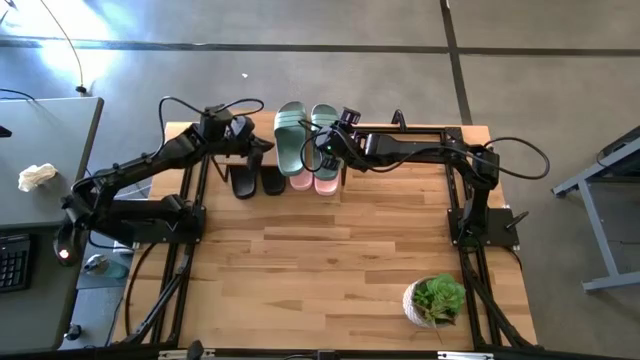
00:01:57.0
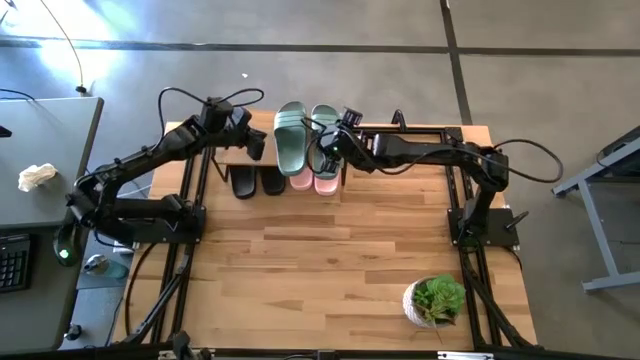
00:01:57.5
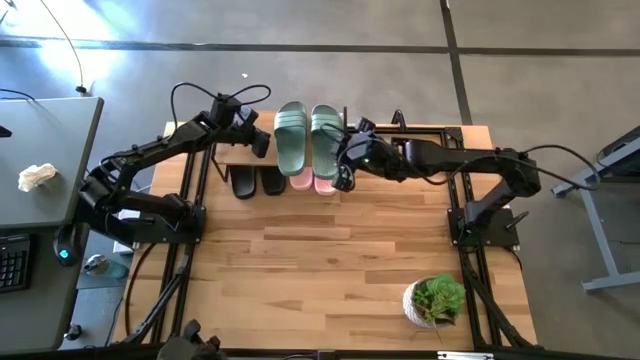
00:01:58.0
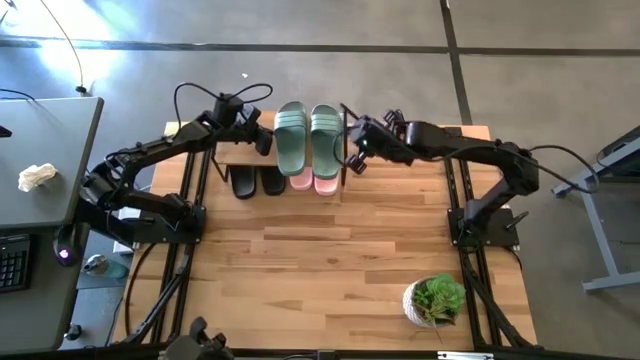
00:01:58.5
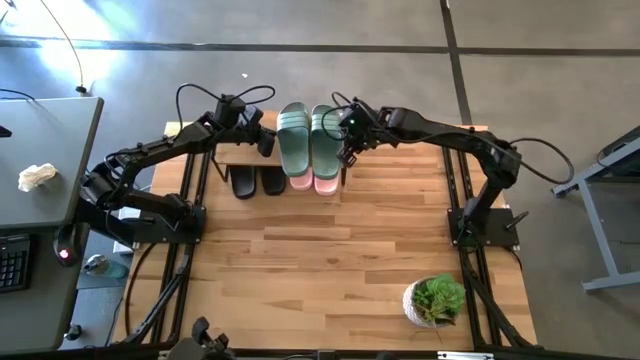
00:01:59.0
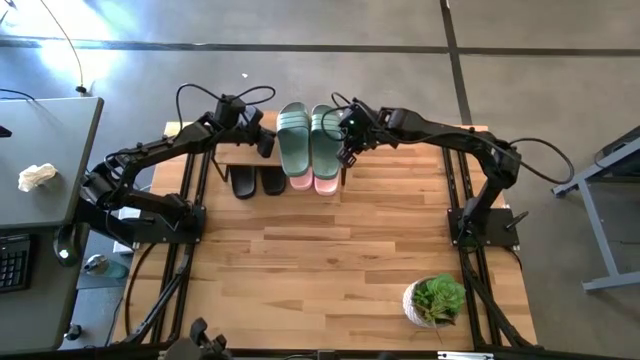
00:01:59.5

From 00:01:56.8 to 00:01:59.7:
Task: Pick and place slides into the shelf
Adjust the blue slipper on the shelf

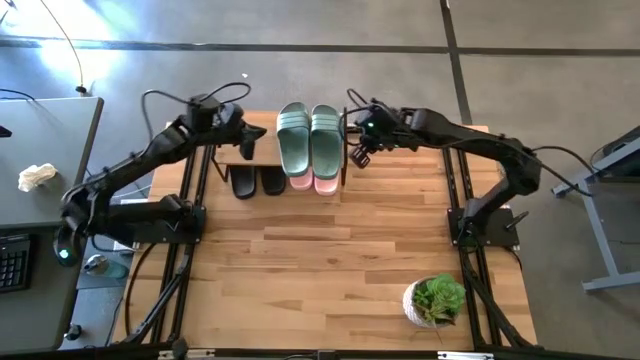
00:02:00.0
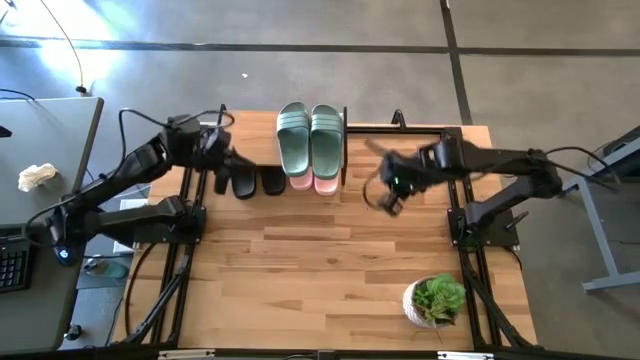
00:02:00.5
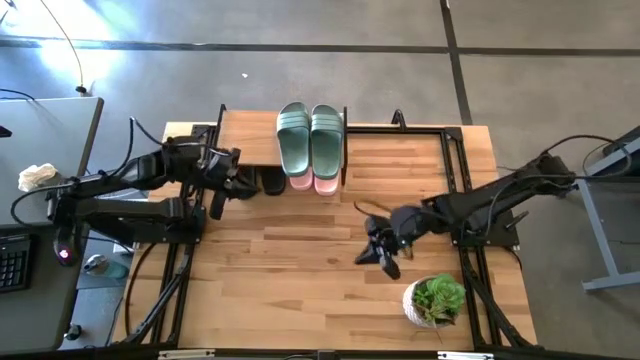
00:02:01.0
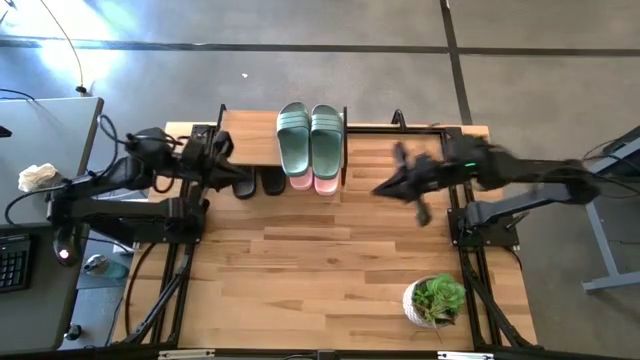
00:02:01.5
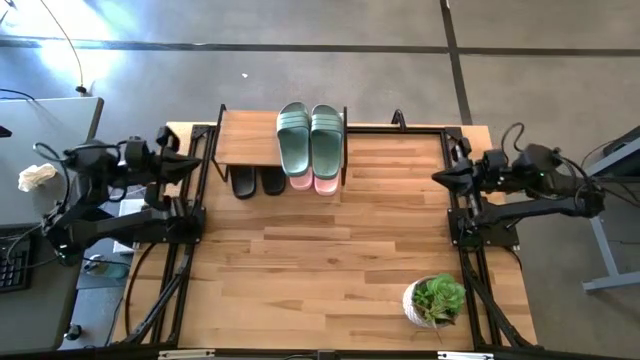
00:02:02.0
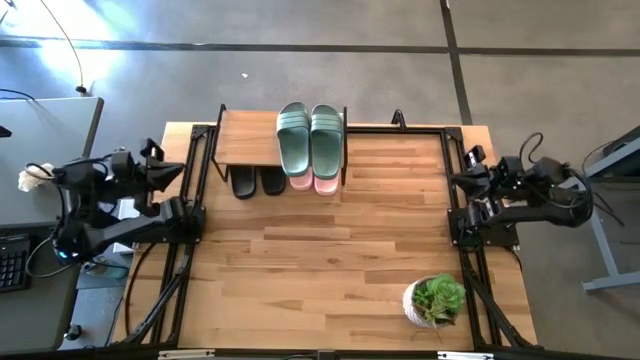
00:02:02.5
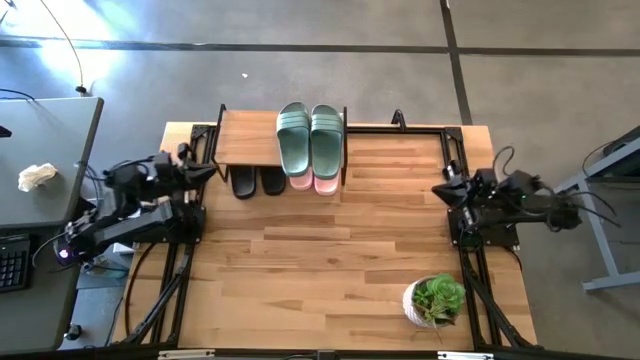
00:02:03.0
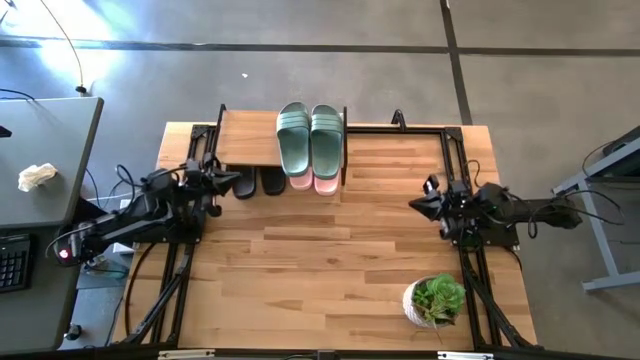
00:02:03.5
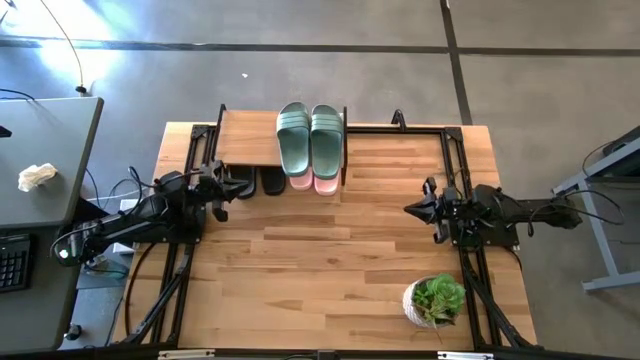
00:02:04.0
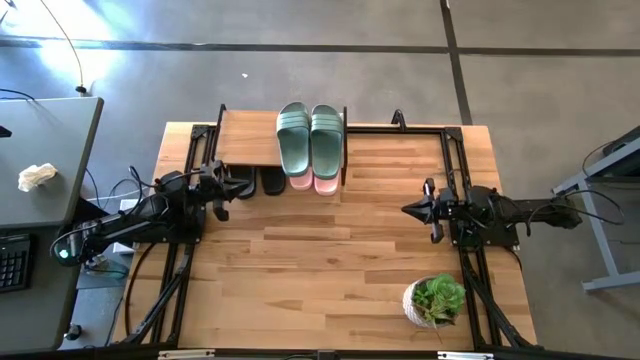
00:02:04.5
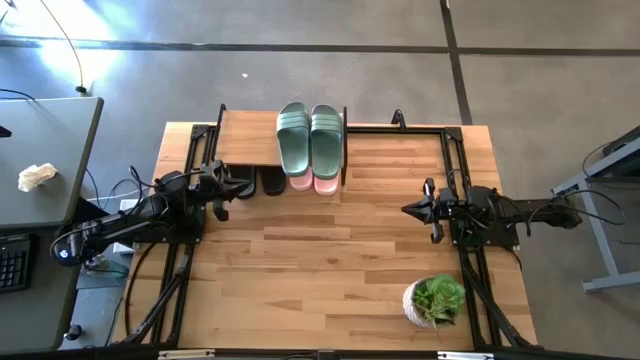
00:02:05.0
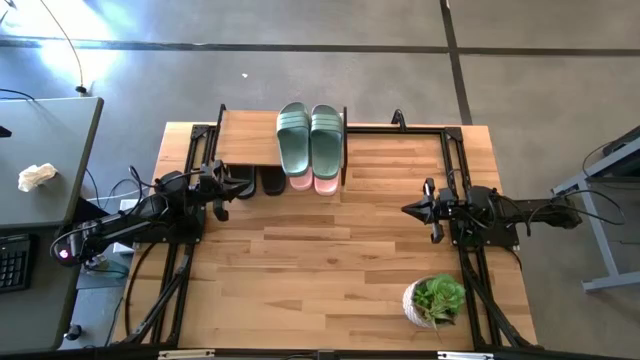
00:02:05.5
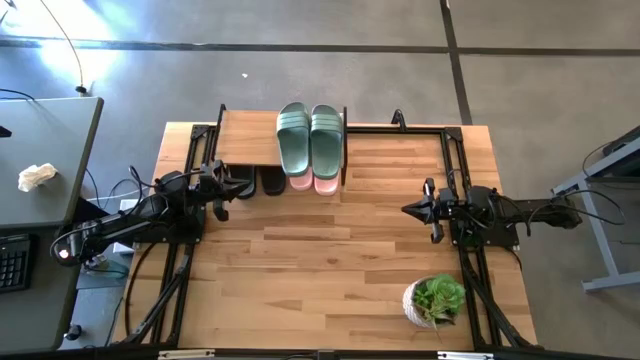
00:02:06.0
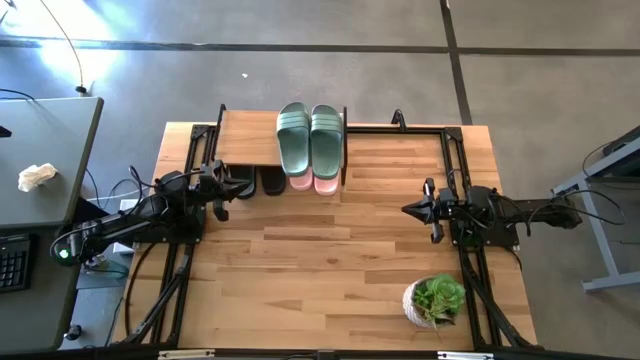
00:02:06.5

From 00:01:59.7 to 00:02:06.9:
Return to Home Position

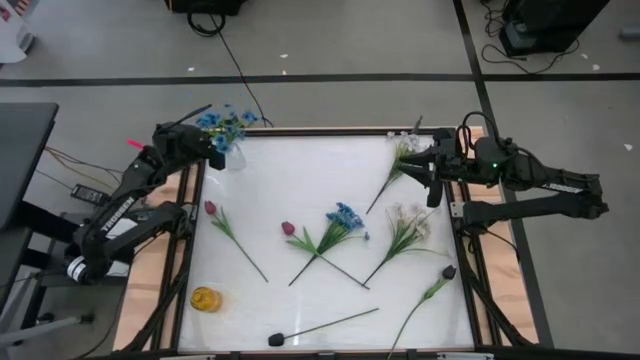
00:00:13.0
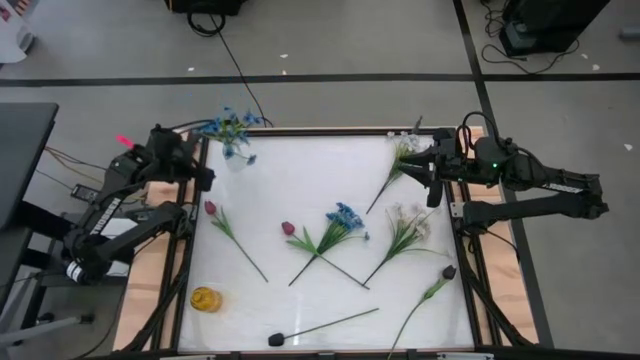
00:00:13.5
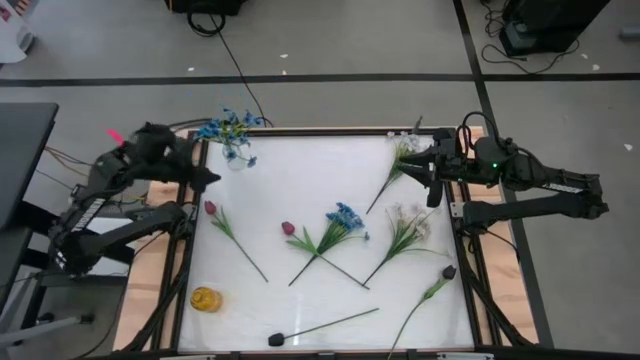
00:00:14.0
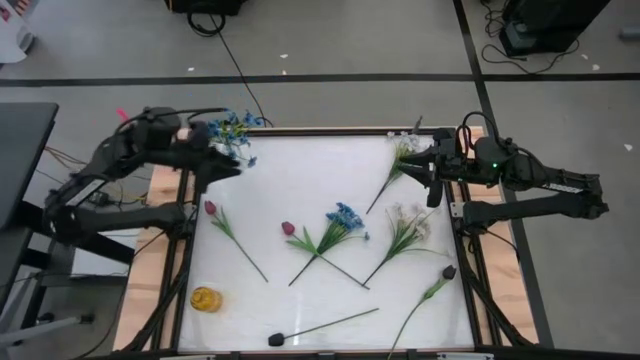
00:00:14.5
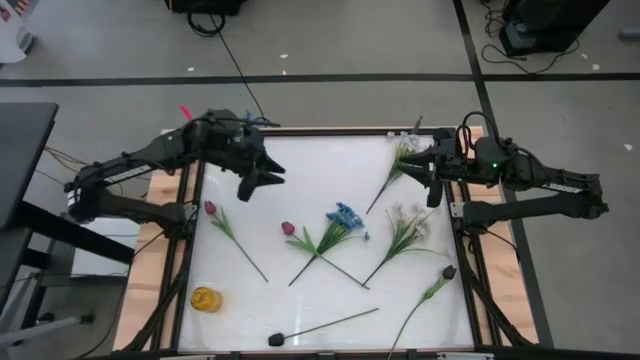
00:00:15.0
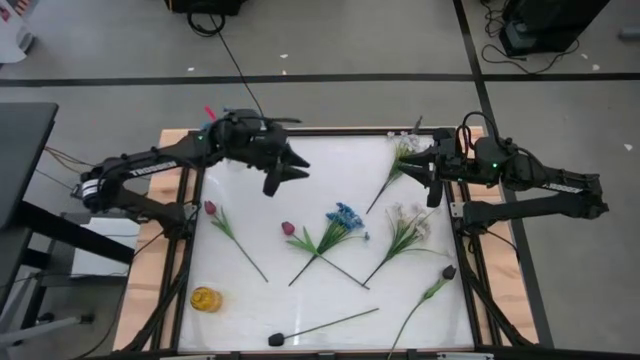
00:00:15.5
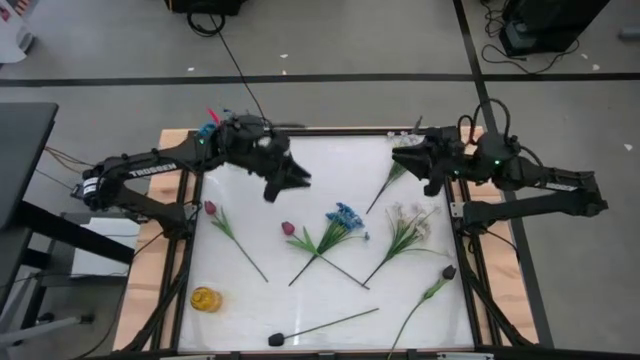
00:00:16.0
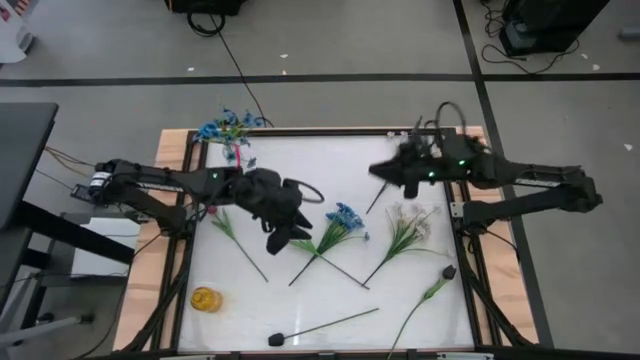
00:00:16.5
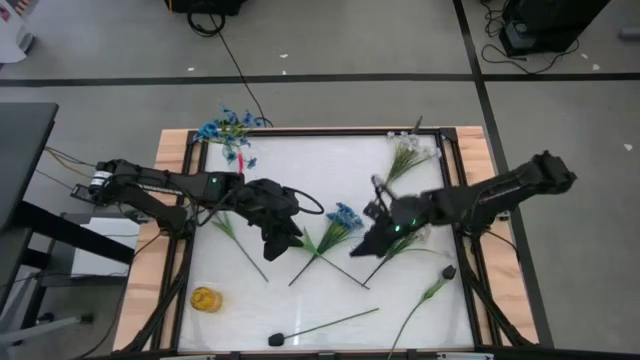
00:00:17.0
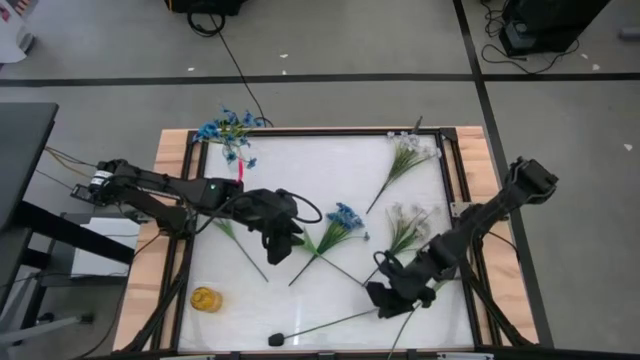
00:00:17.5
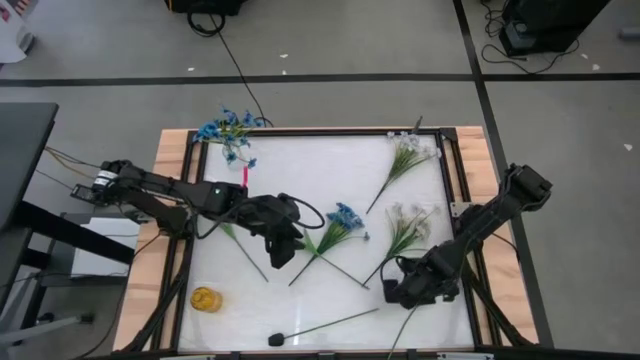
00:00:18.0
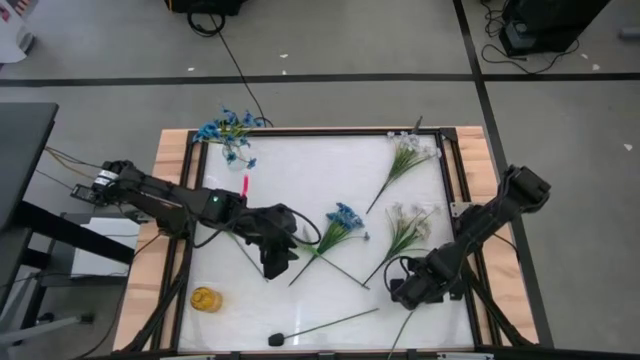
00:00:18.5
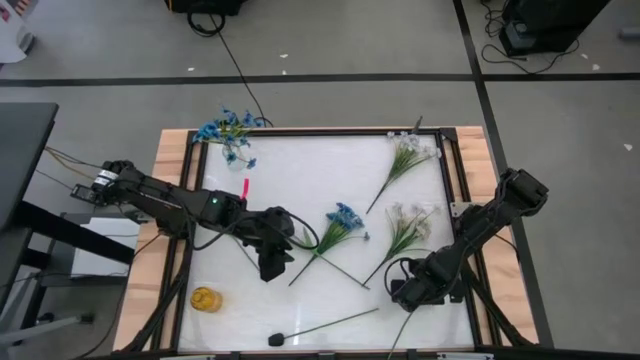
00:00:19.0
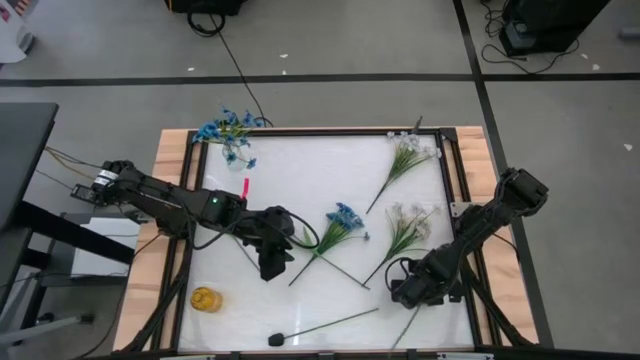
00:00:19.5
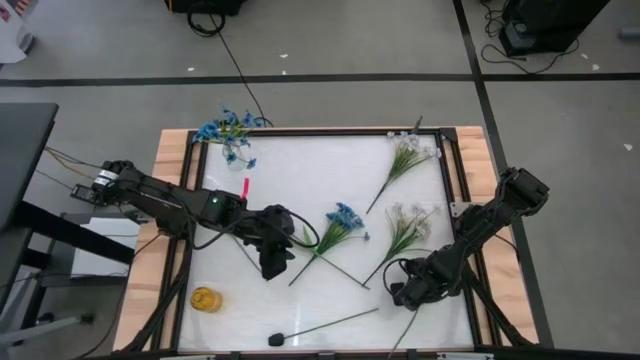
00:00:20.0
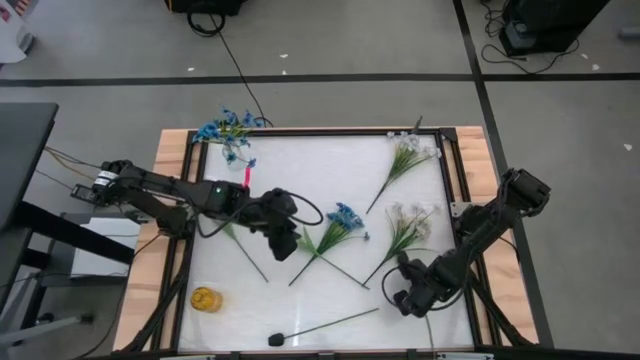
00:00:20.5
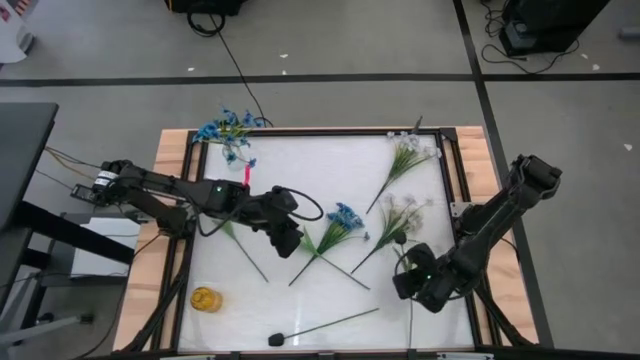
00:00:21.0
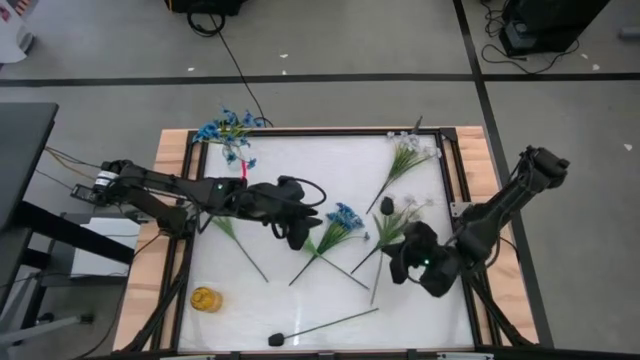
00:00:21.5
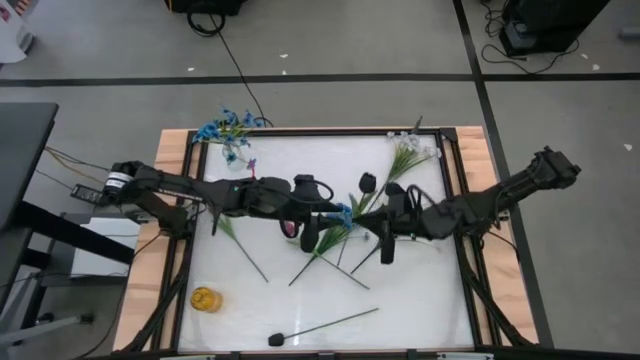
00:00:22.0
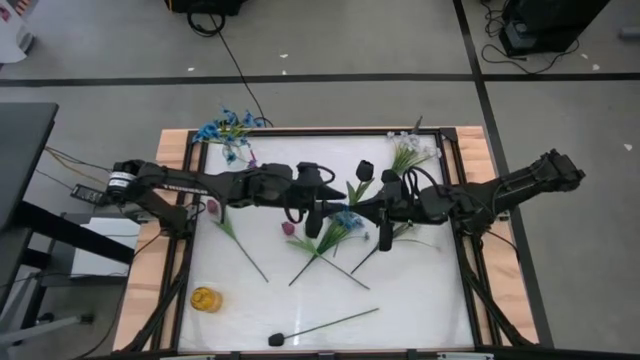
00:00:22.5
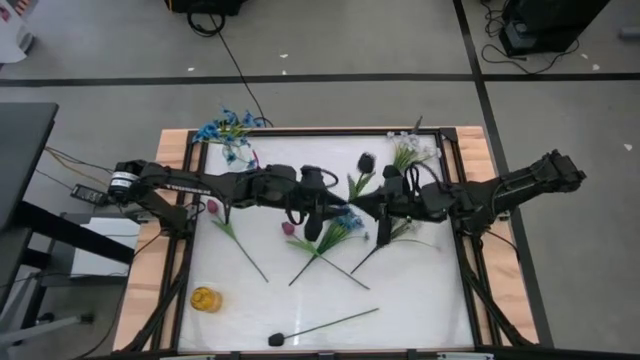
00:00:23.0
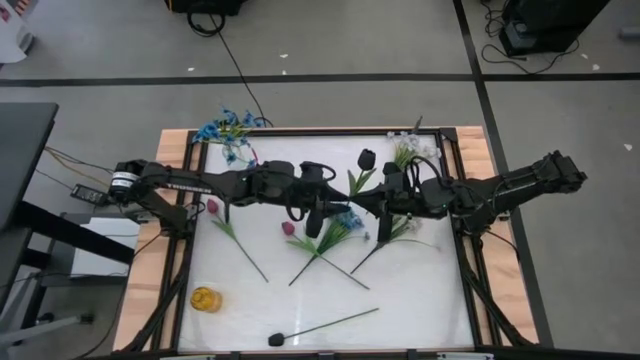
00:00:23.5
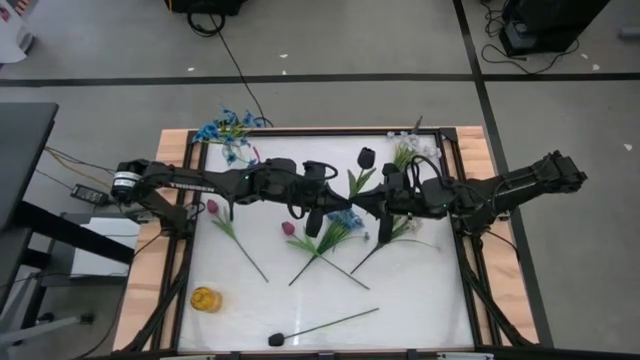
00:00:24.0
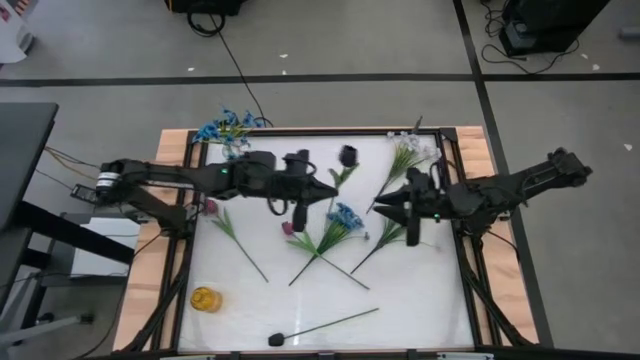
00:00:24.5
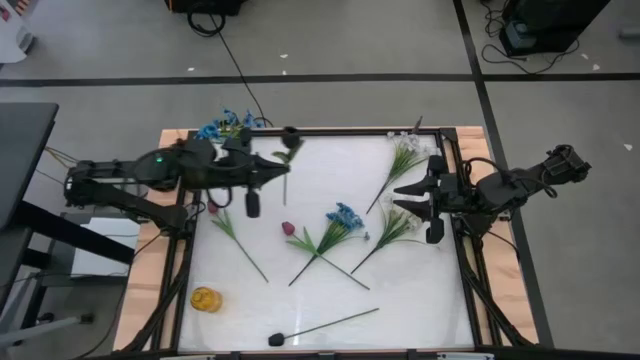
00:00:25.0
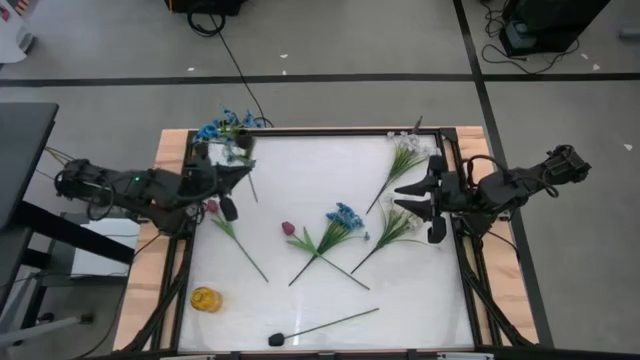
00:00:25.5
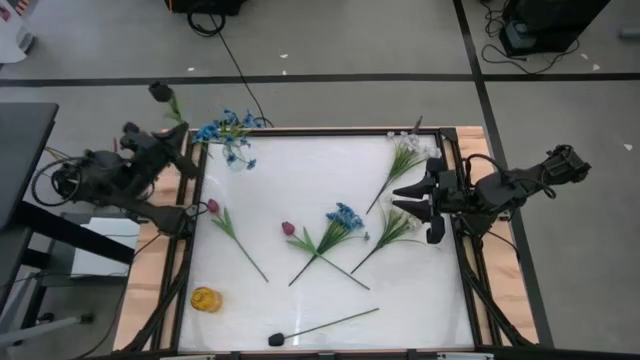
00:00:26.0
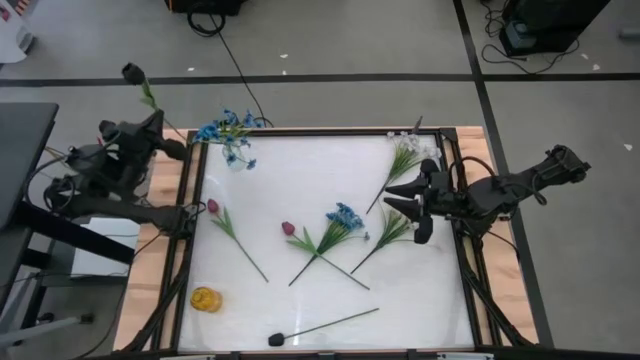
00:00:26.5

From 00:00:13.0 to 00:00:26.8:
Task: Sort flowers into vase by color
Put the right black tulip into the transparent vase
